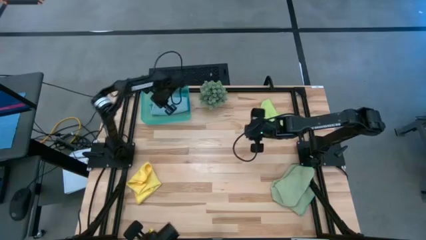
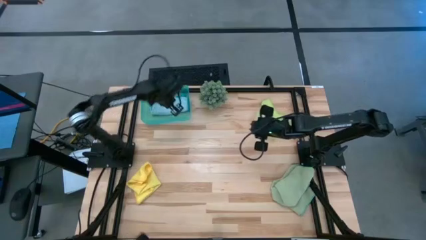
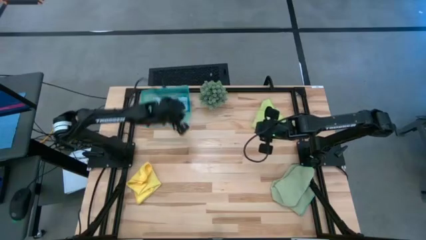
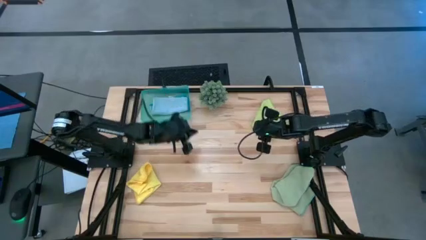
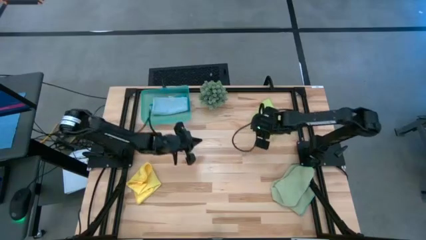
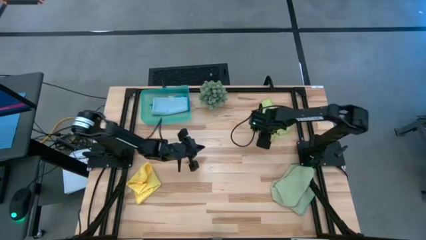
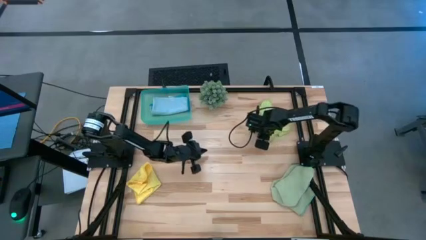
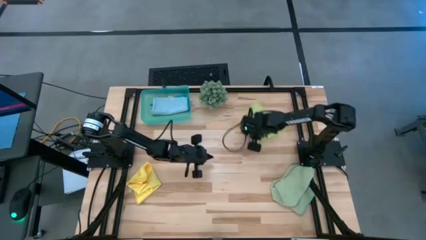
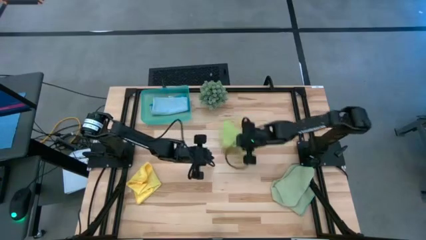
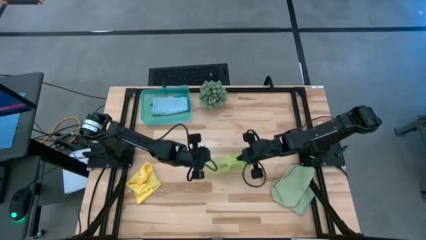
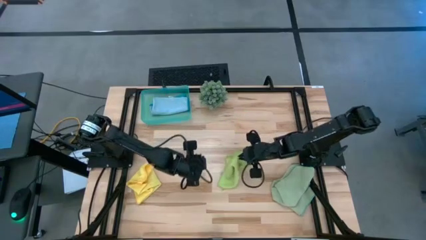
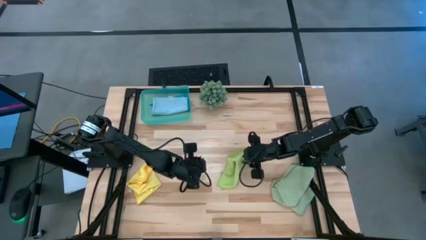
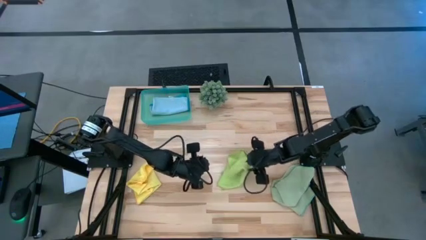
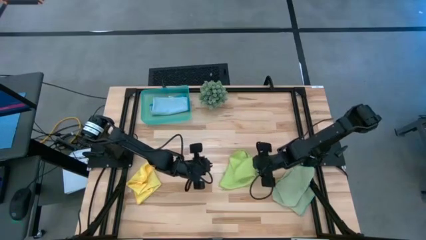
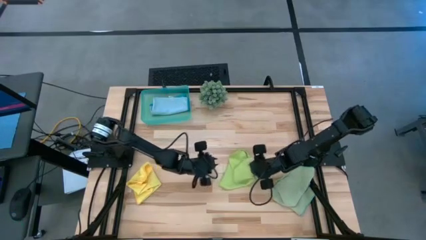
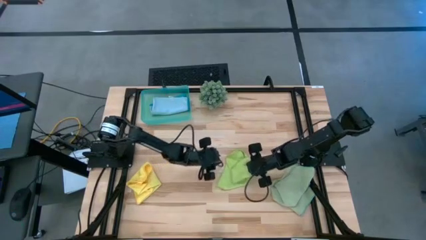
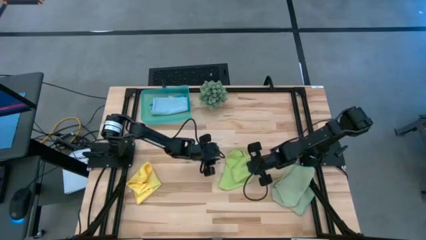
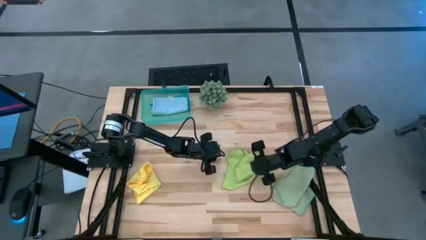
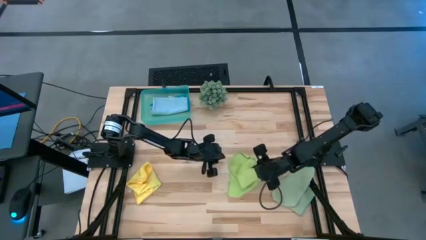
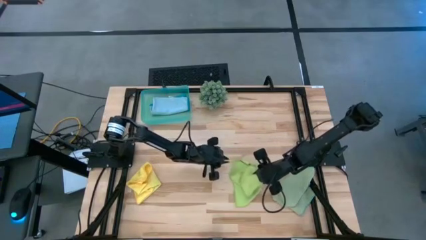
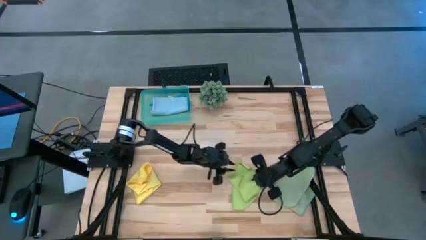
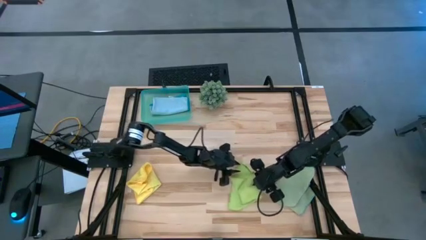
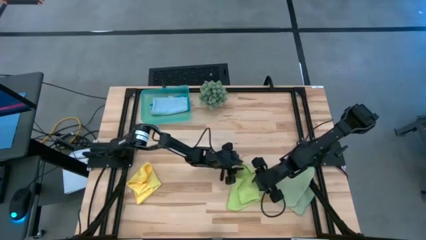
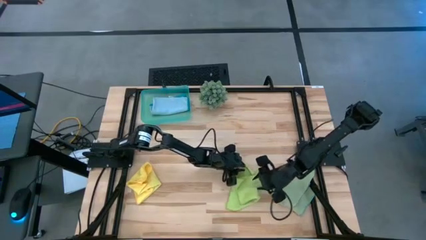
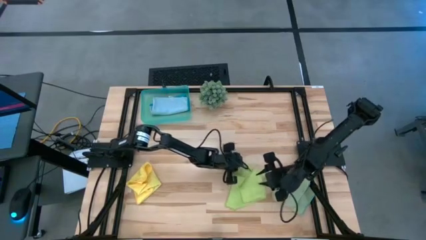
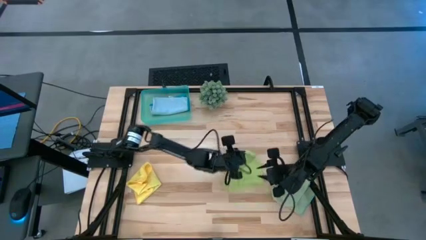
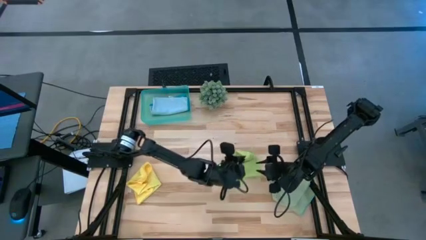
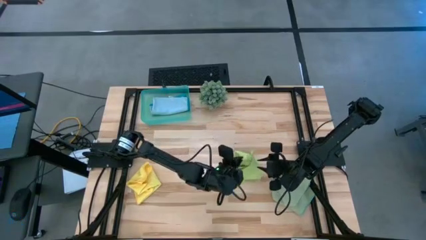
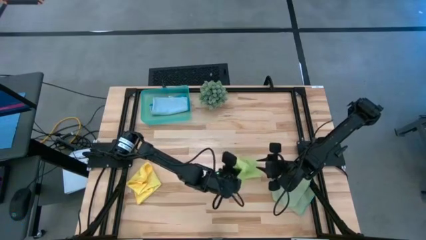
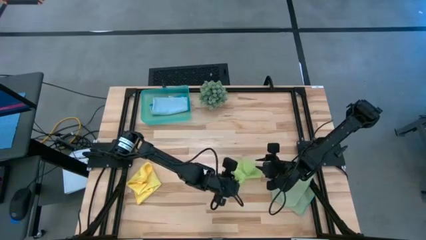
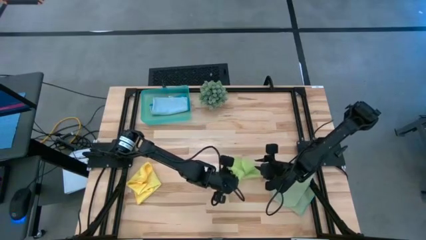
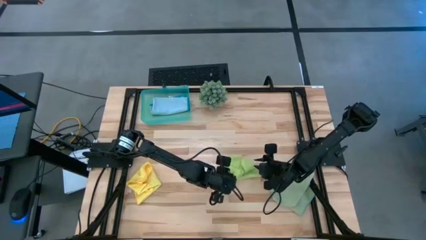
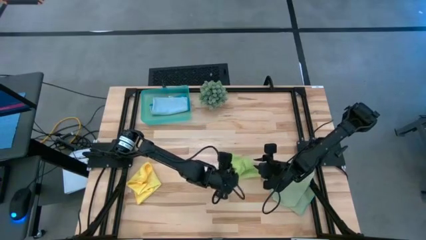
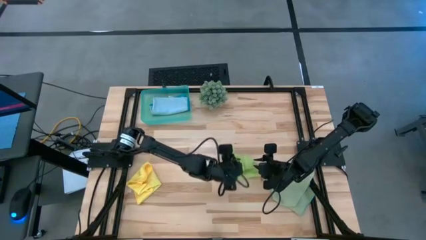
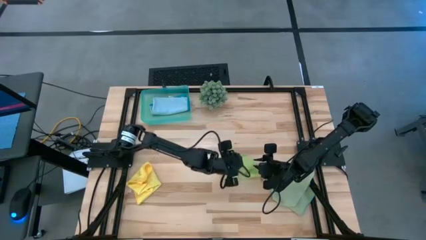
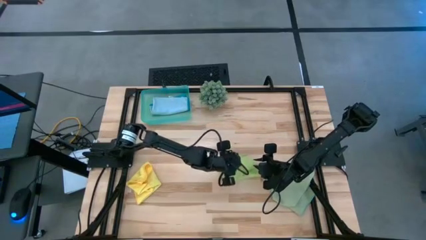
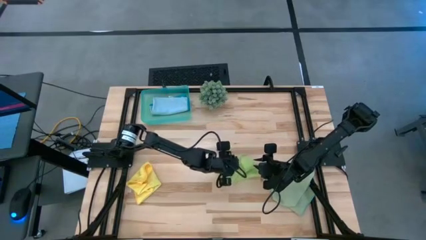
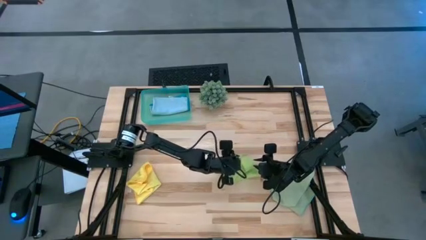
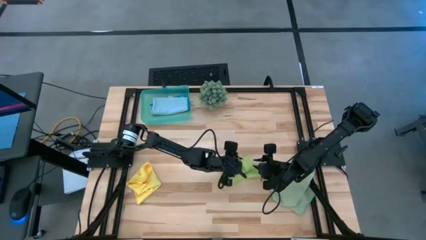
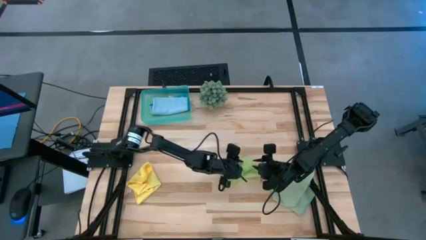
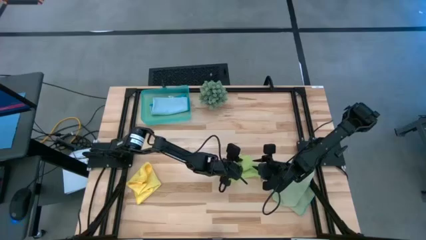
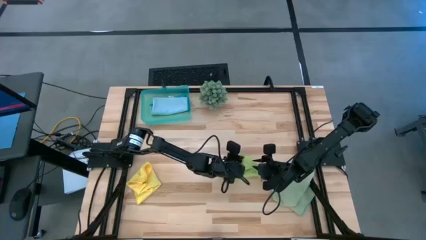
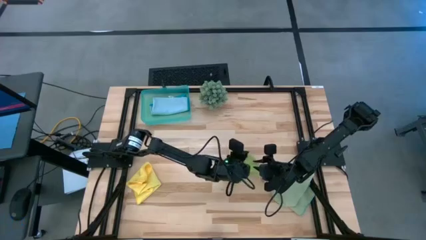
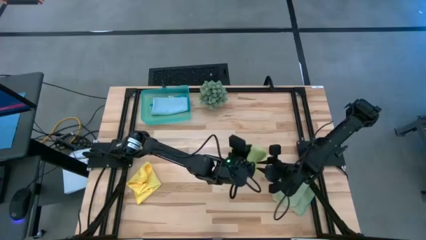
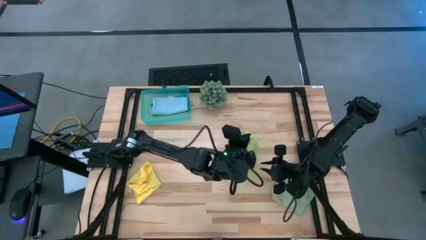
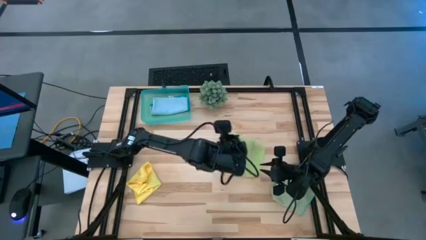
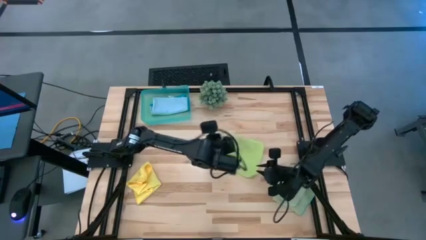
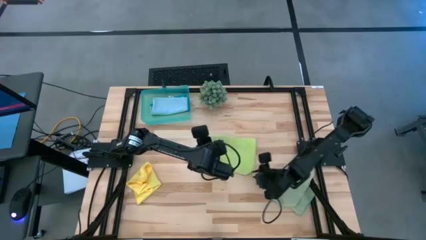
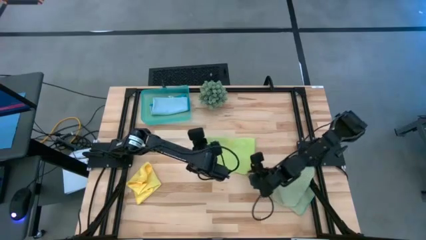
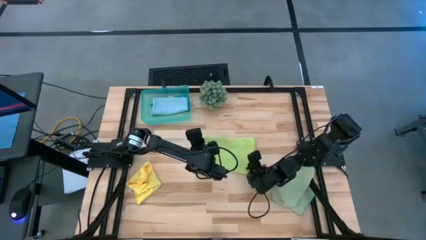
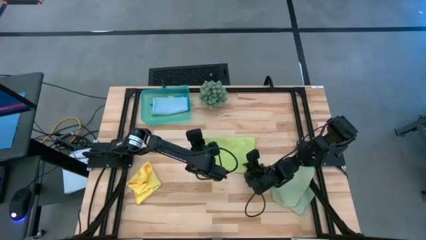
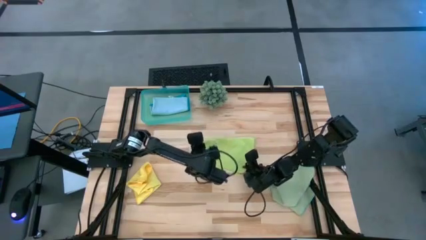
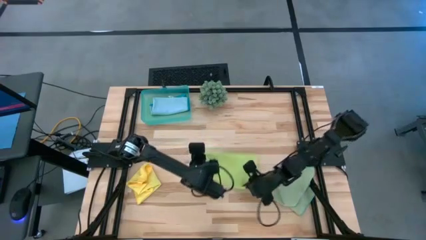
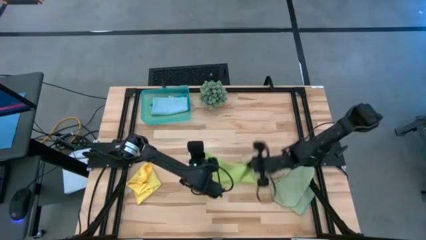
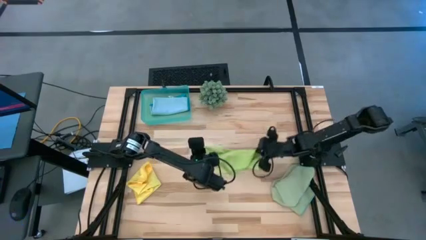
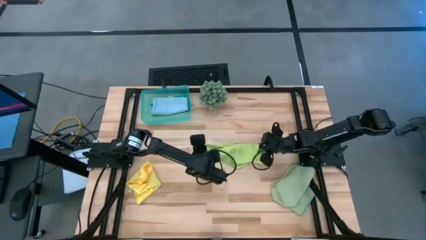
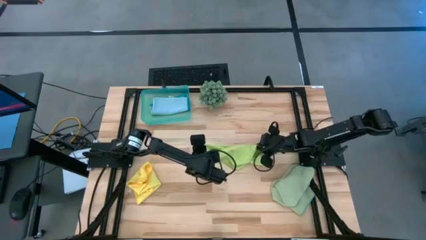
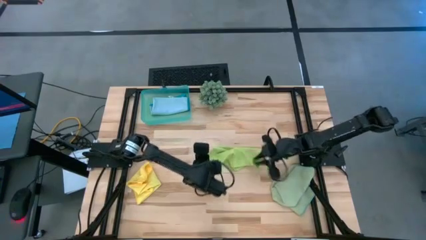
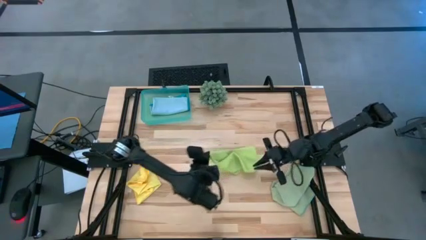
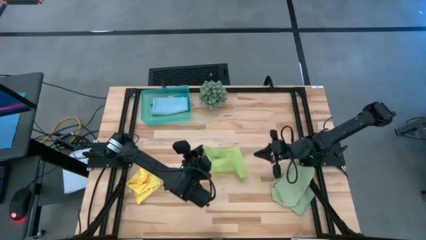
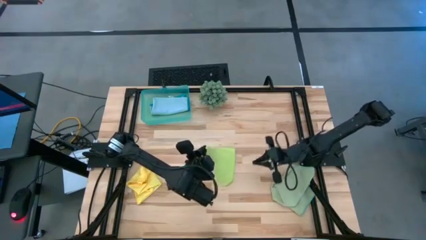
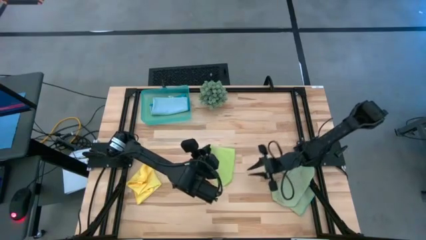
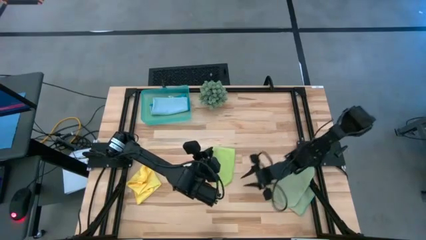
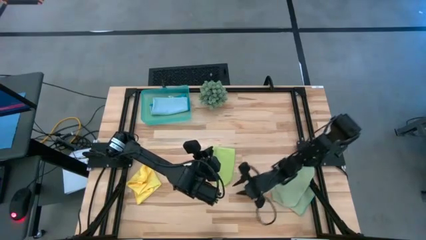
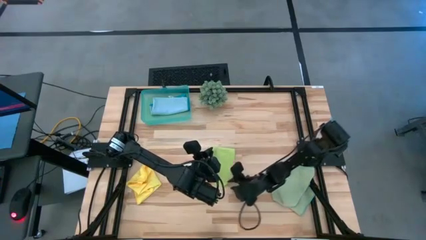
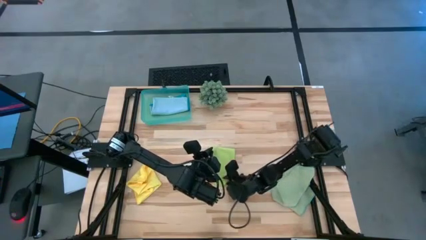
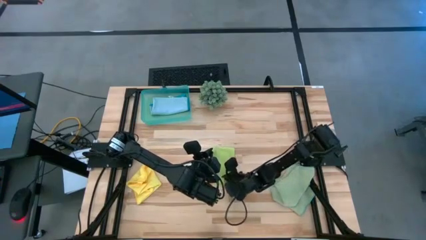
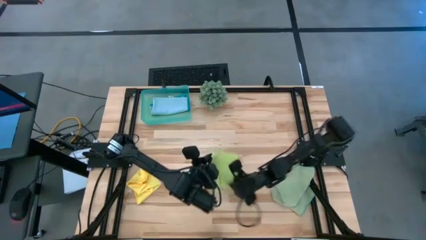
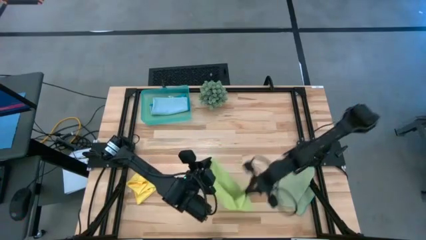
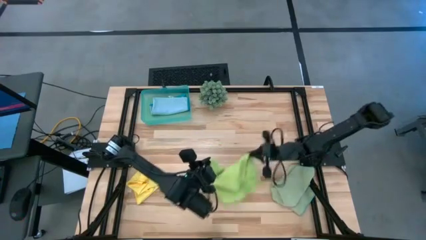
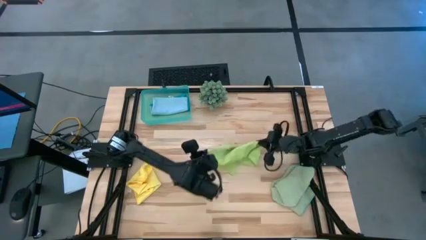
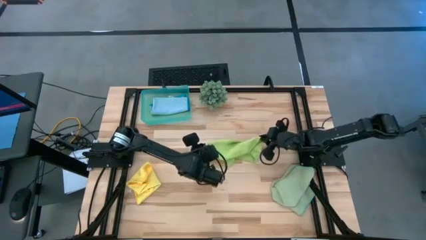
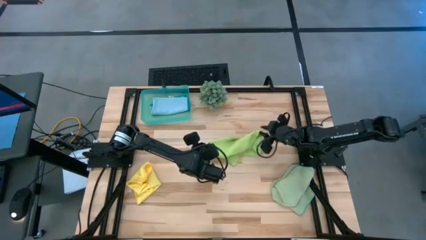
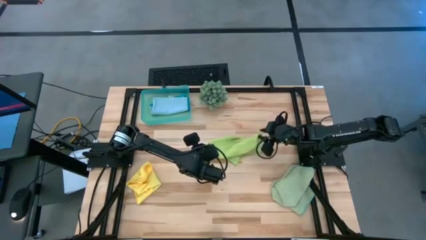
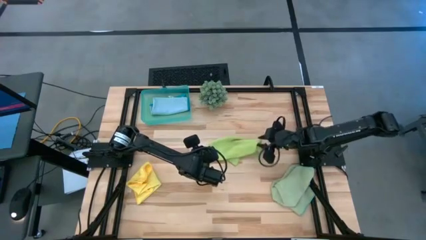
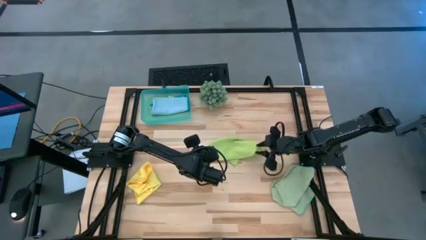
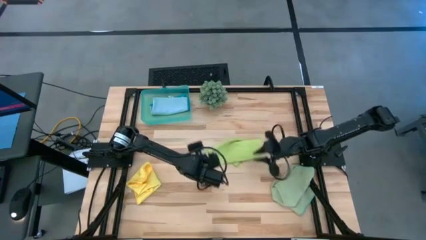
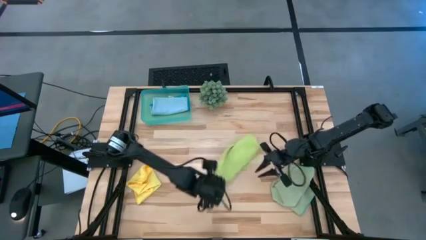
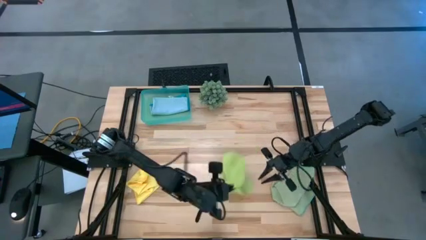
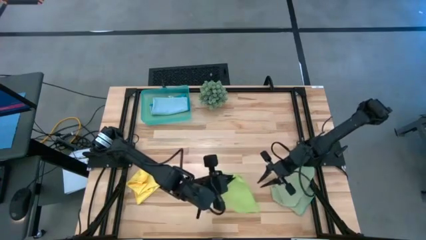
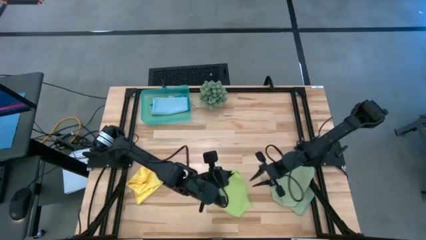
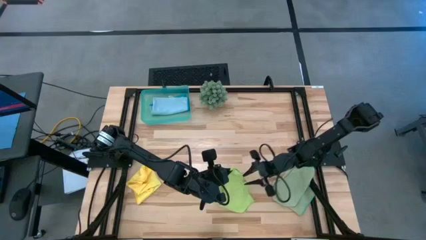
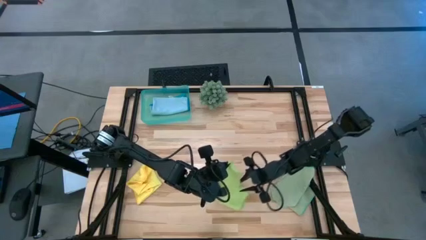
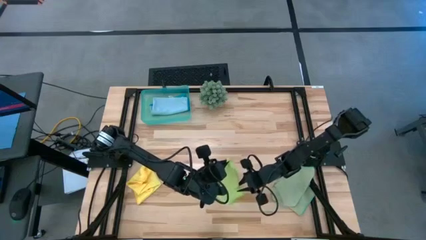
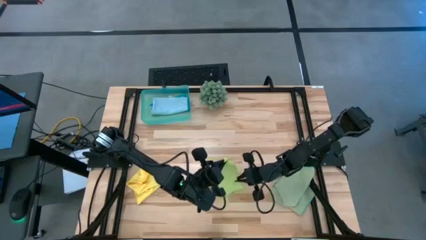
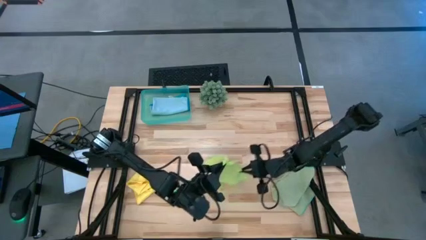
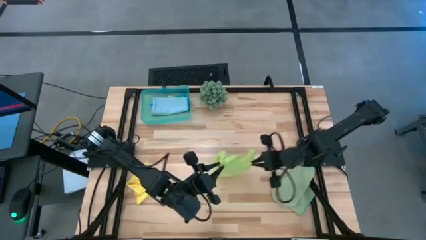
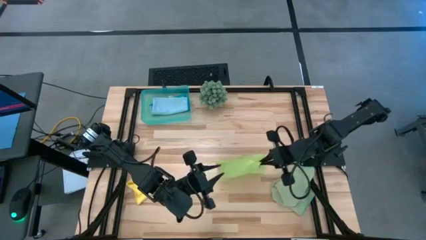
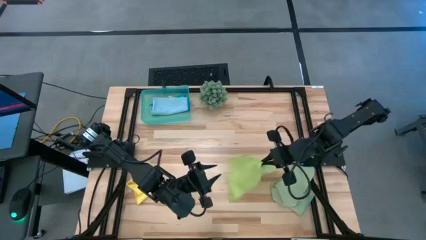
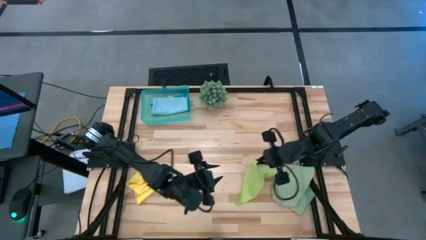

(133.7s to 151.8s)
Task: Fold microfiber towels
Fold the light green microfiber cloth
